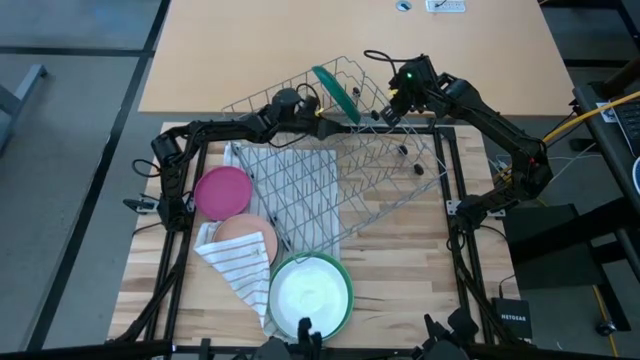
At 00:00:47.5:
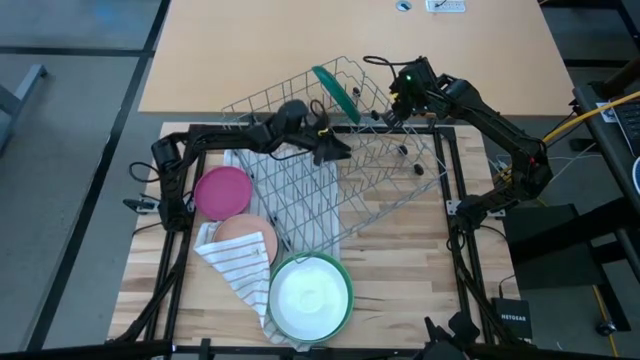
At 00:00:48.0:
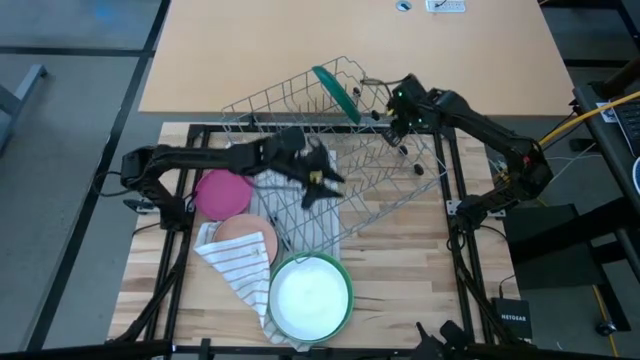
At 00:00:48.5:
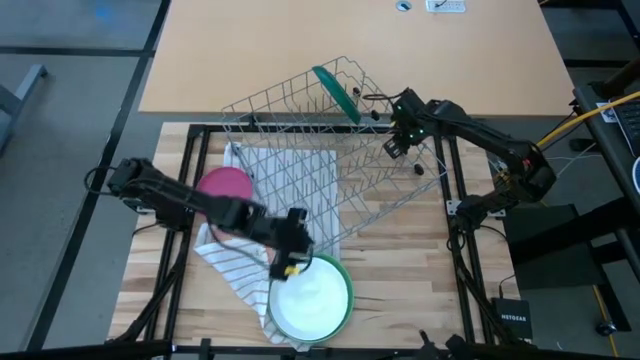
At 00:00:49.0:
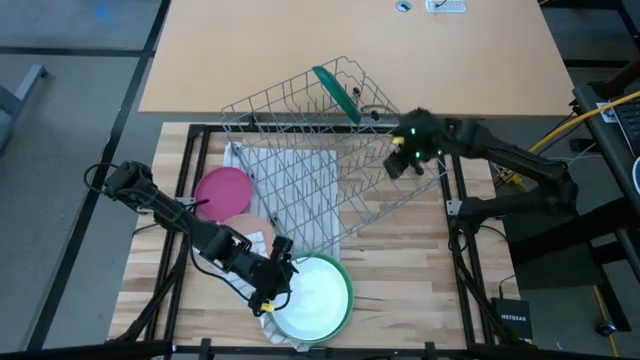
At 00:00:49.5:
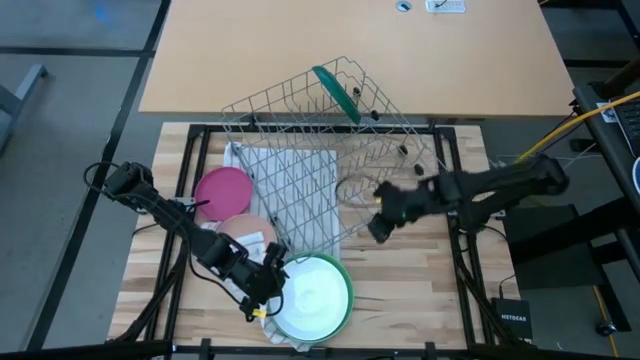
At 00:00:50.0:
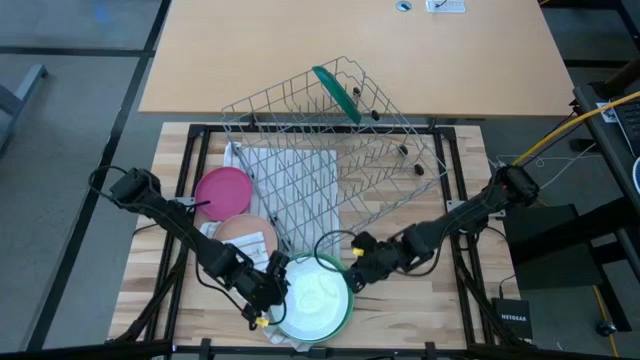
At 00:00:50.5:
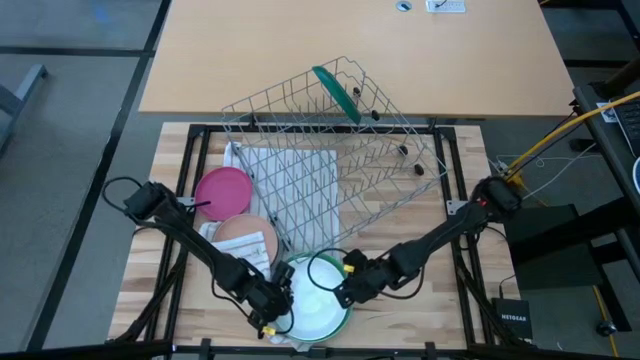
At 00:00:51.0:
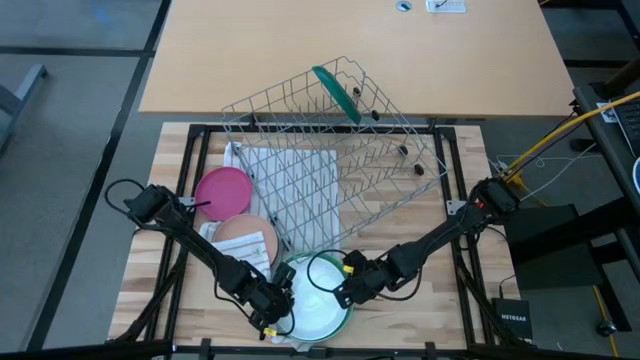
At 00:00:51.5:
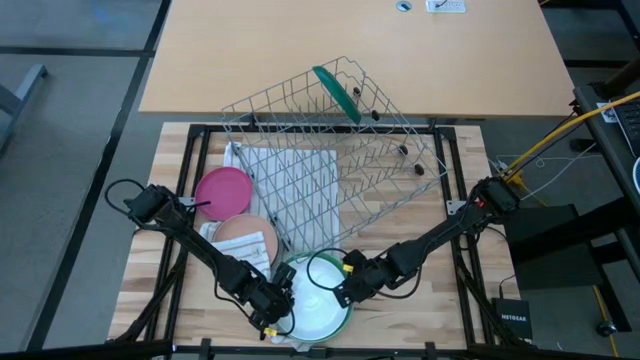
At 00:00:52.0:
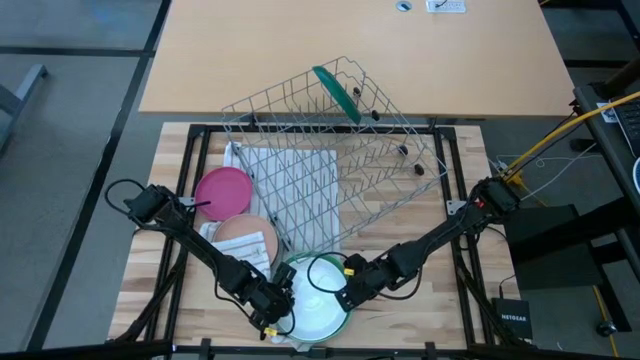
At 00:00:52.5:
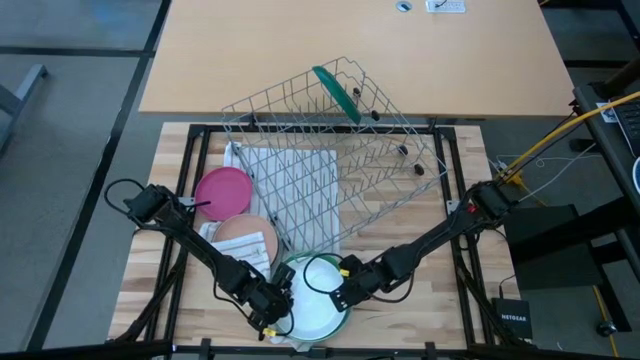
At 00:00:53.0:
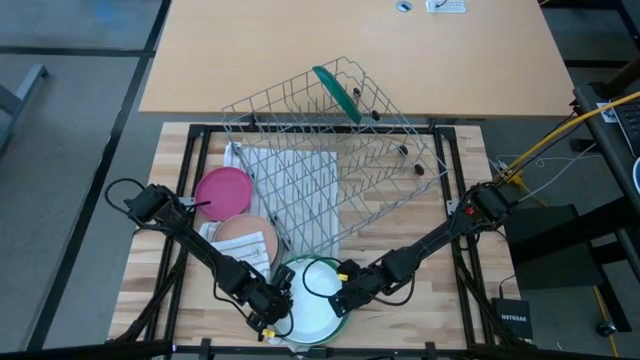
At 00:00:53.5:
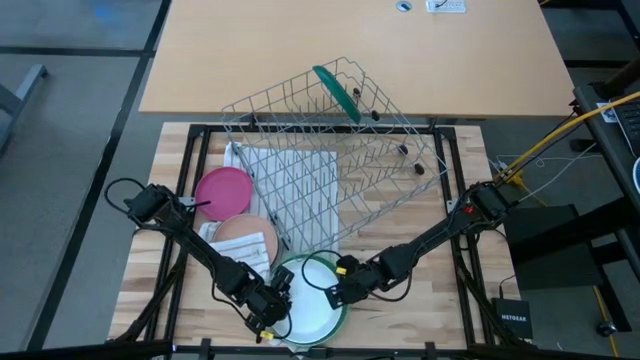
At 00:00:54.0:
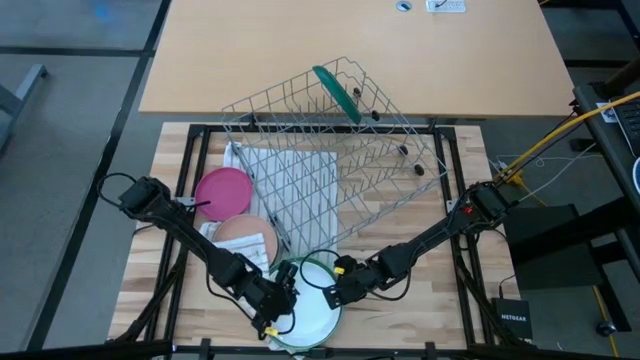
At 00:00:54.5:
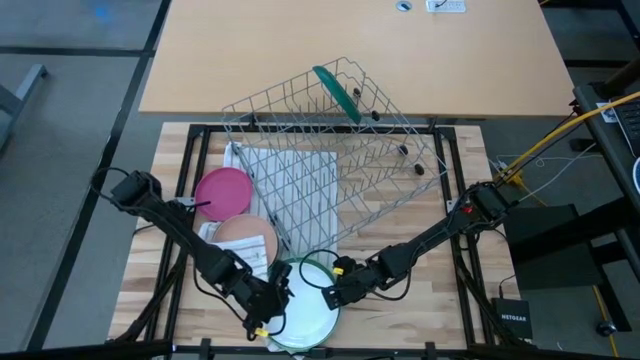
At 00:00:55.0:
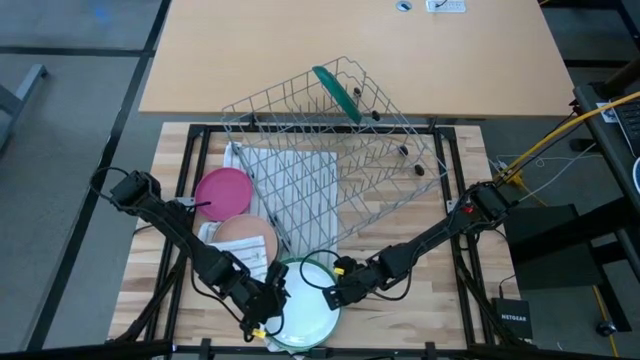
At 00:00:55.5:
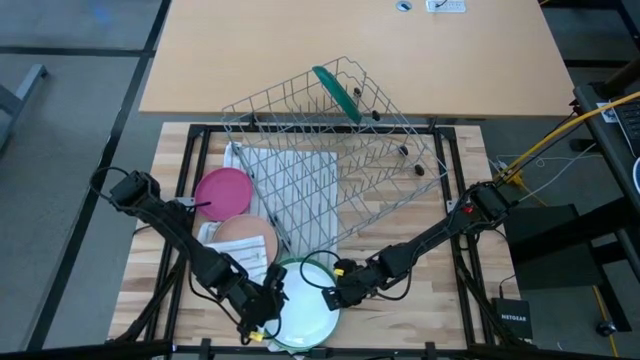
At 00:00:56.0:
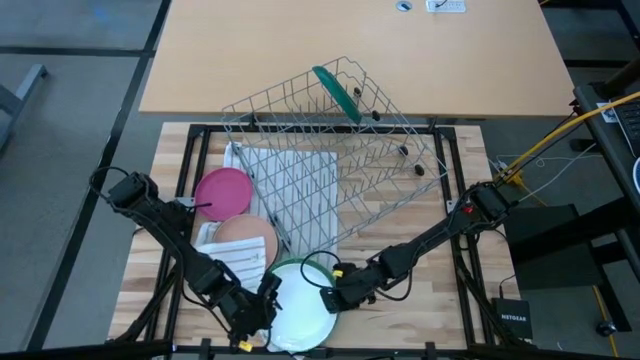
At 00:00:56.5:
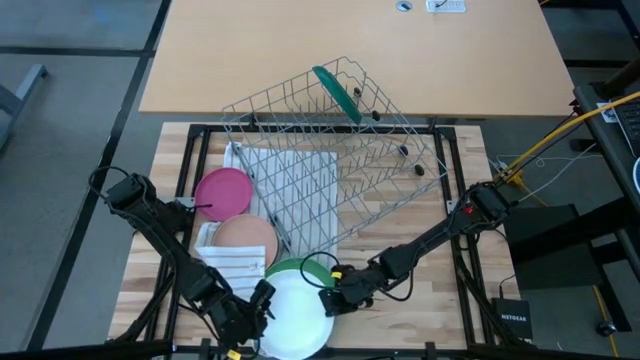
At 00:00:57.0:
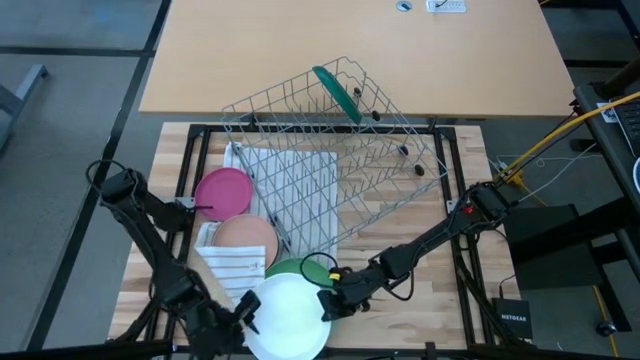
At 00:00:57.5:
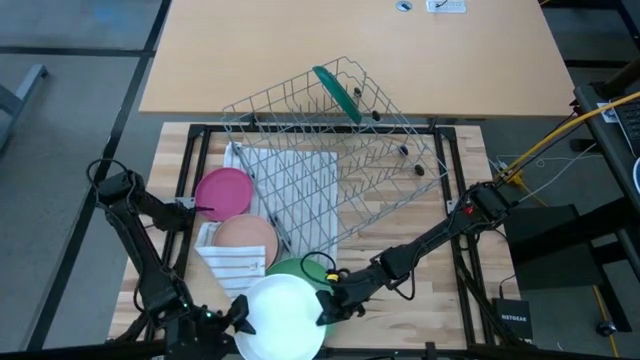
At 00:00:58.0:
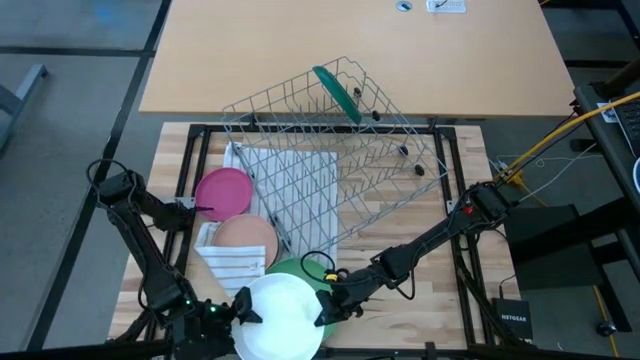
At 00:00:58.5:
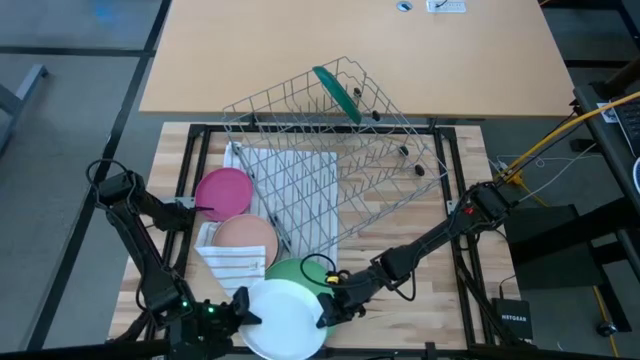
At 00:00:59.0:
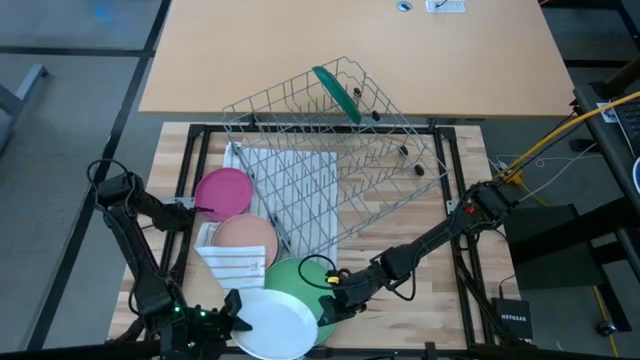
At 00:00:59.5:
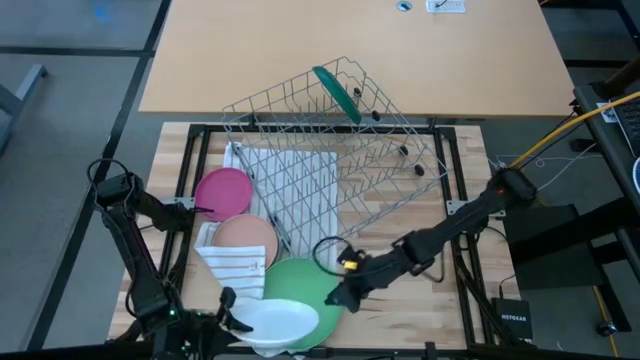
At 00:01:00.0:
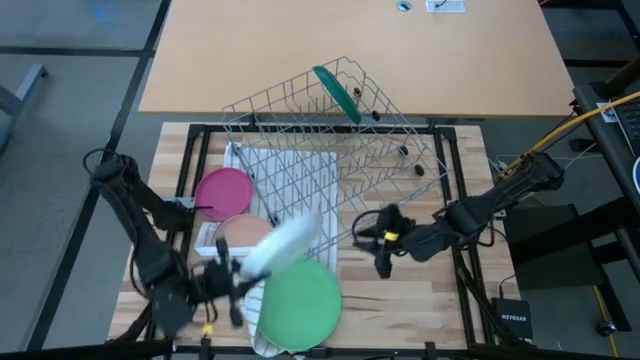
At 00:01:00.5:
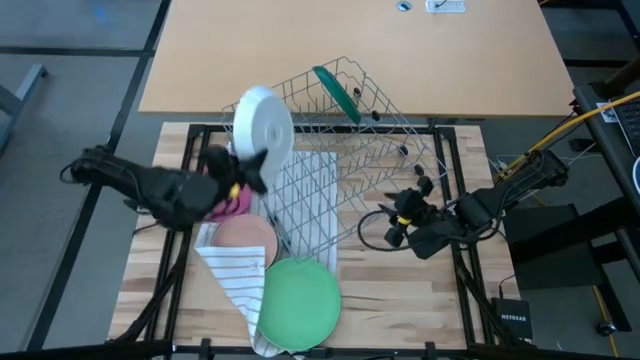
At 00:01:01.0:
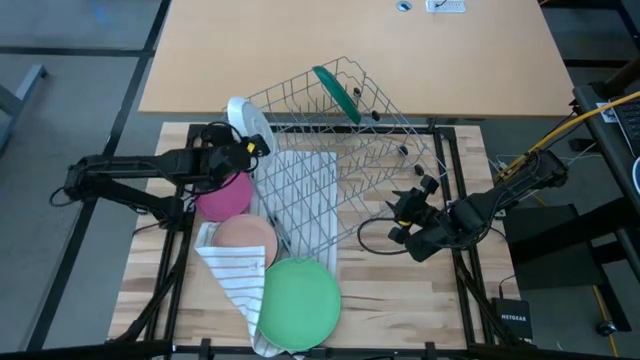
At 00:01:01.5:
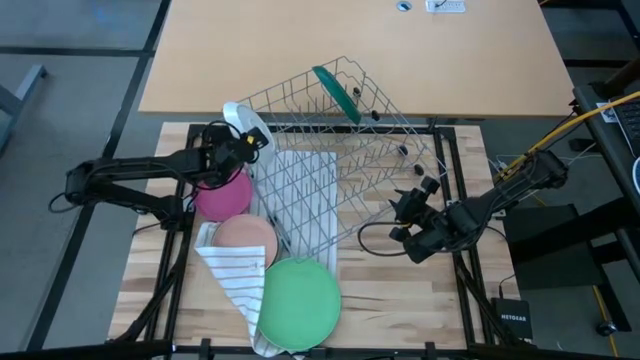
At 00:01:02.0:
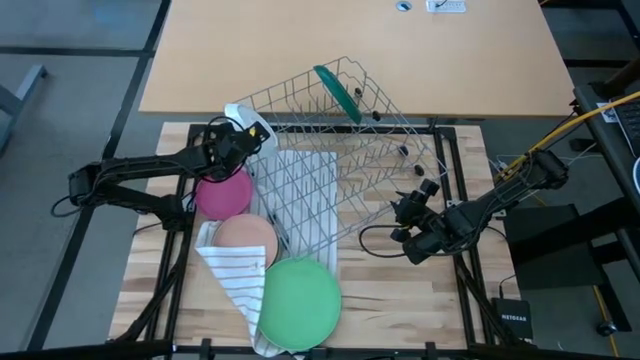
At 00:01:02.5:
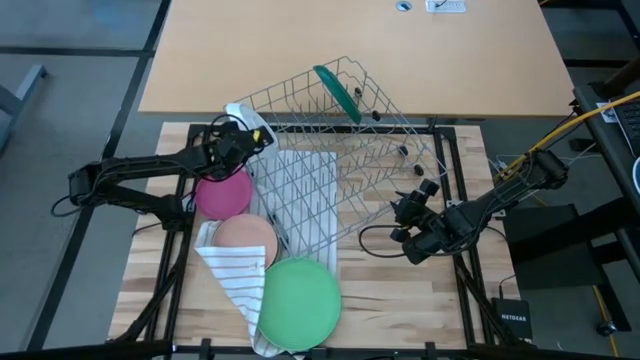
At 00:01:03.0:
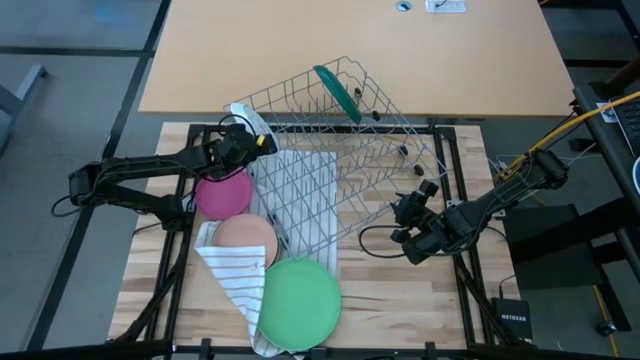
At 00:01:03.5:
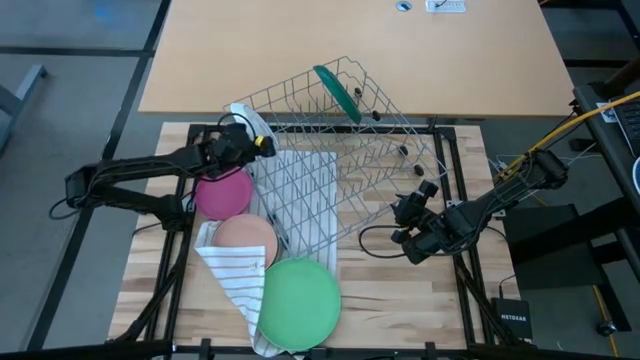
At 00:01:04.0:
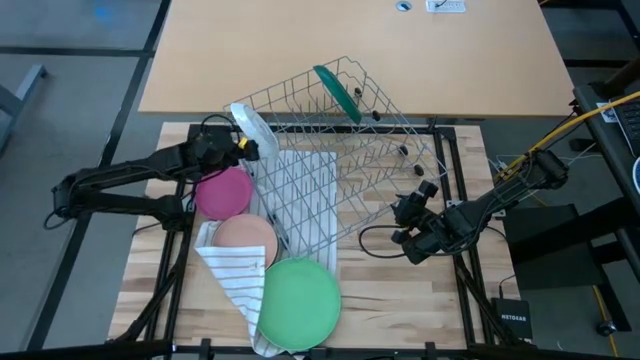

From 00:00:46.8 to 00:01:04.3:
Task: Sort dishes
Put the white plate in the dish rack
